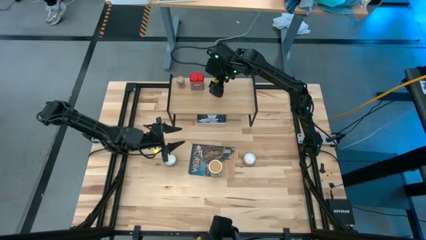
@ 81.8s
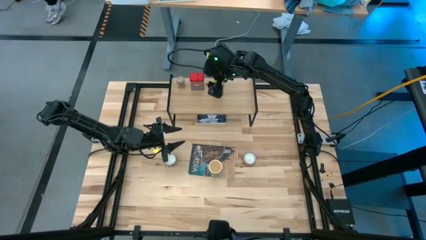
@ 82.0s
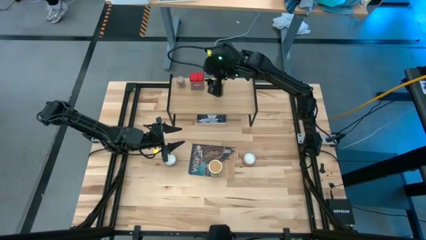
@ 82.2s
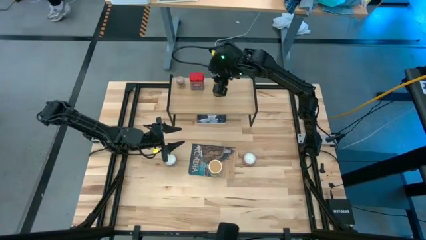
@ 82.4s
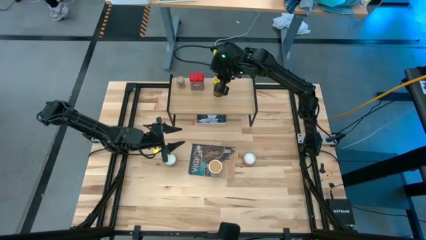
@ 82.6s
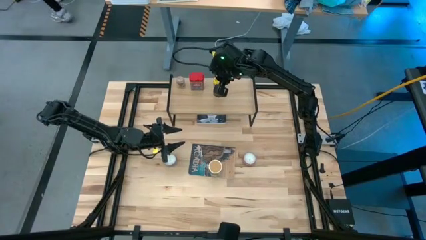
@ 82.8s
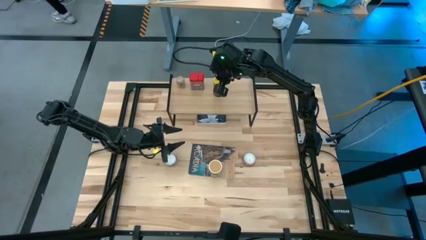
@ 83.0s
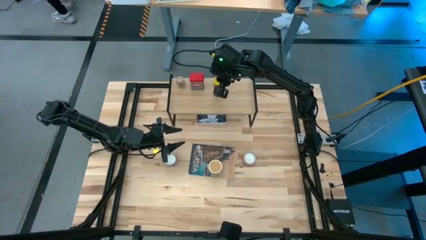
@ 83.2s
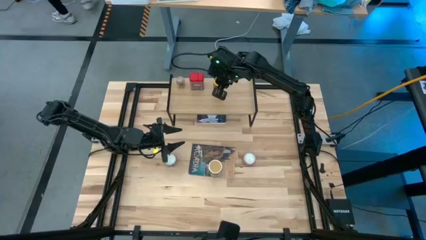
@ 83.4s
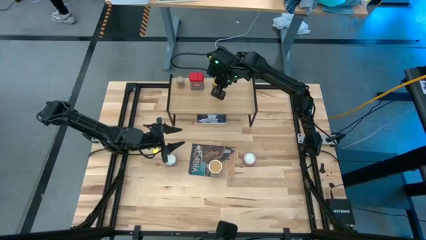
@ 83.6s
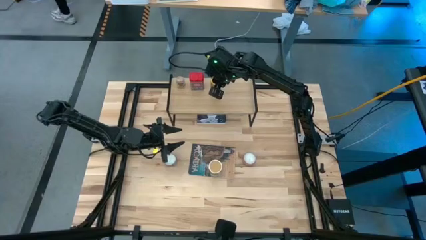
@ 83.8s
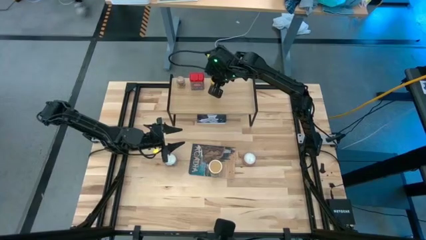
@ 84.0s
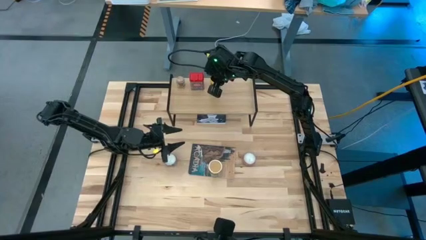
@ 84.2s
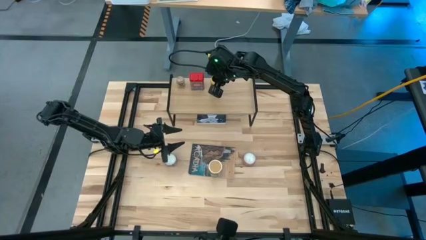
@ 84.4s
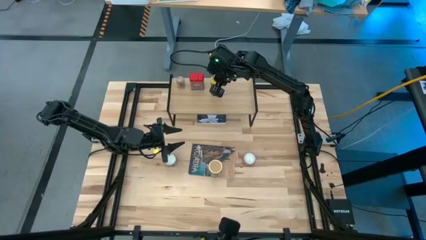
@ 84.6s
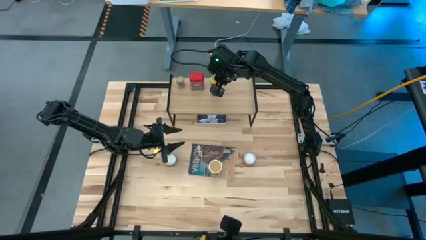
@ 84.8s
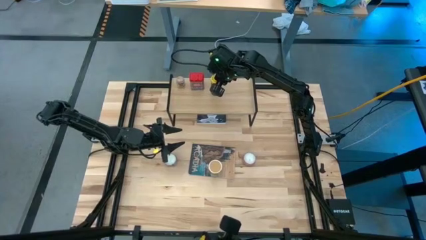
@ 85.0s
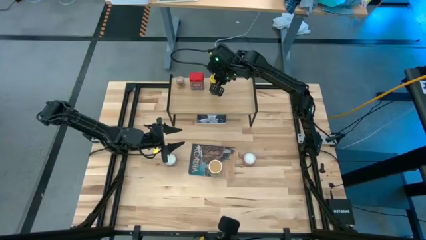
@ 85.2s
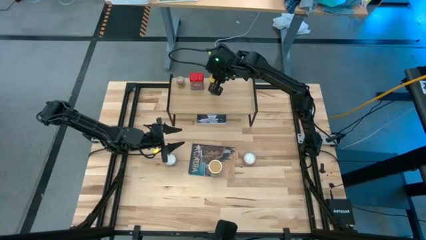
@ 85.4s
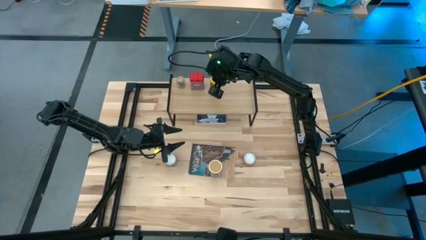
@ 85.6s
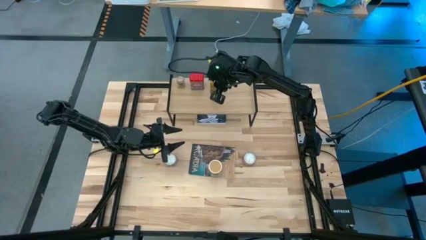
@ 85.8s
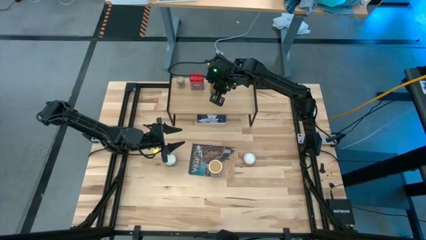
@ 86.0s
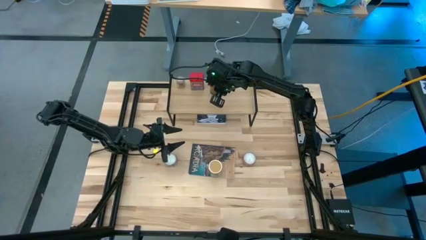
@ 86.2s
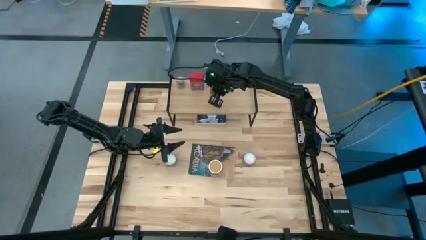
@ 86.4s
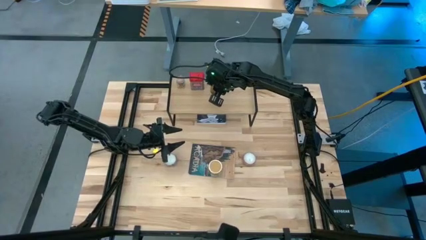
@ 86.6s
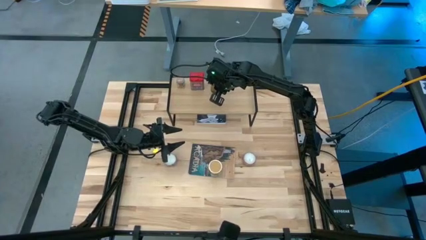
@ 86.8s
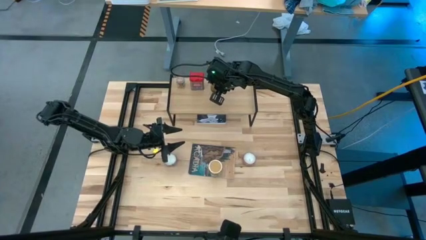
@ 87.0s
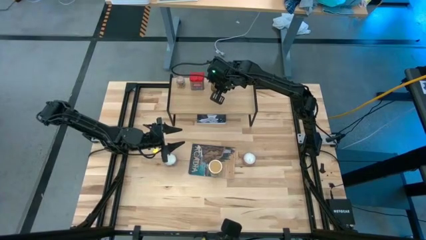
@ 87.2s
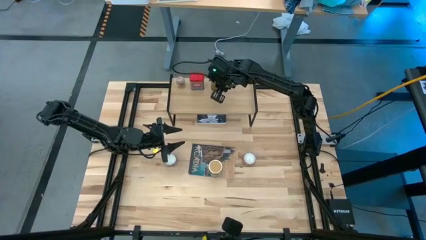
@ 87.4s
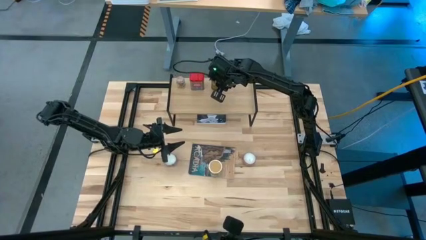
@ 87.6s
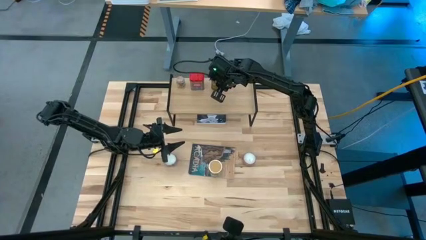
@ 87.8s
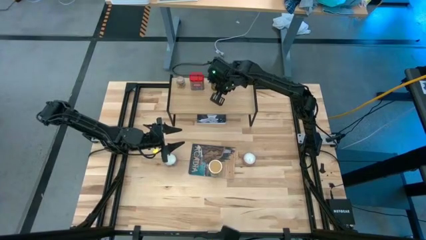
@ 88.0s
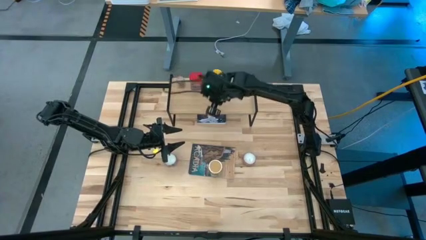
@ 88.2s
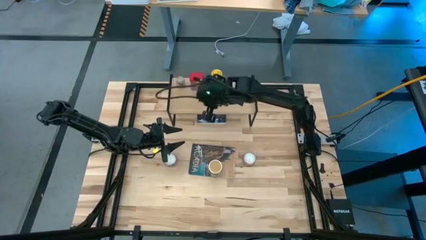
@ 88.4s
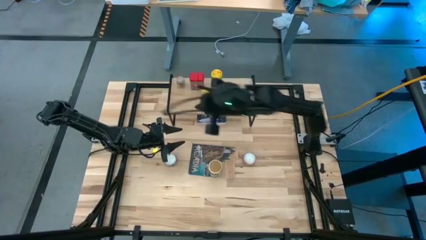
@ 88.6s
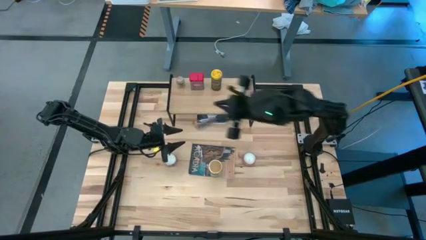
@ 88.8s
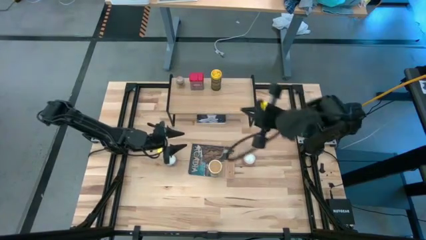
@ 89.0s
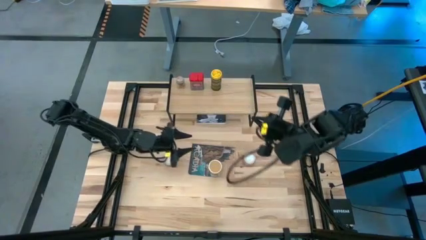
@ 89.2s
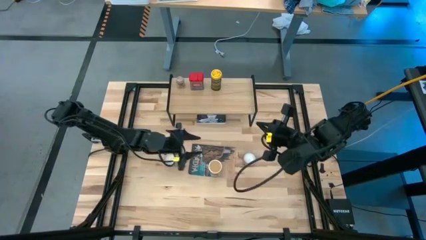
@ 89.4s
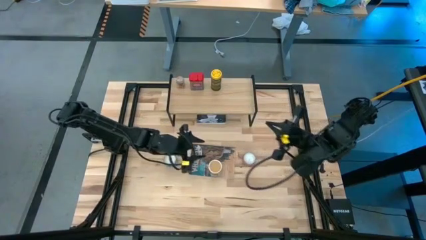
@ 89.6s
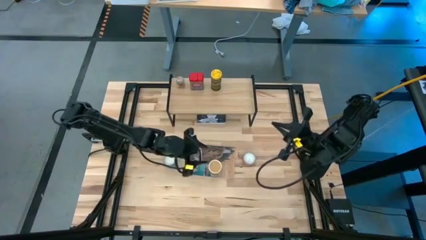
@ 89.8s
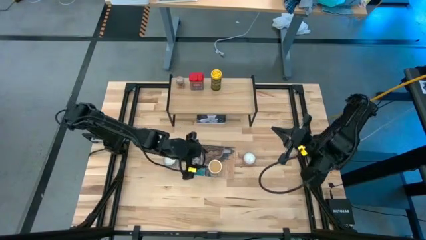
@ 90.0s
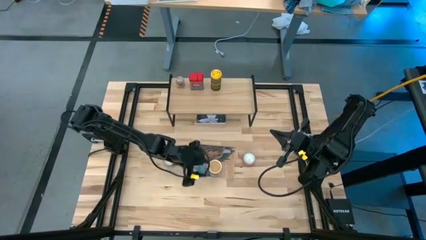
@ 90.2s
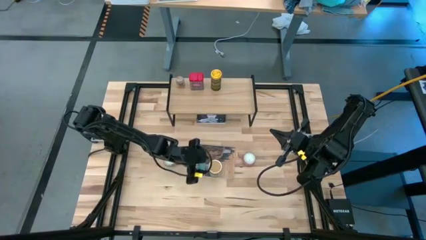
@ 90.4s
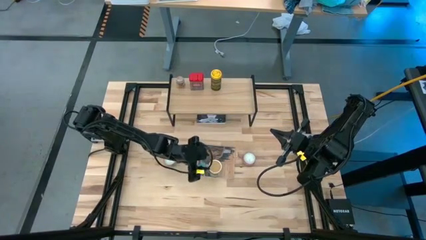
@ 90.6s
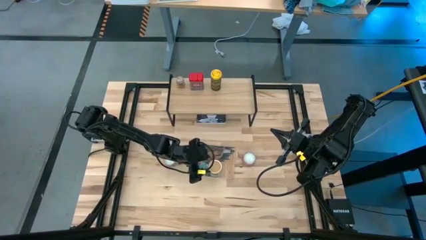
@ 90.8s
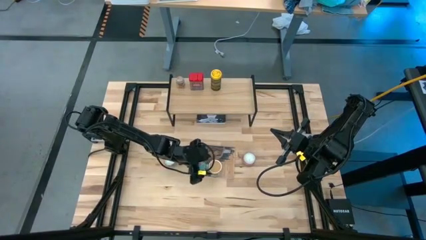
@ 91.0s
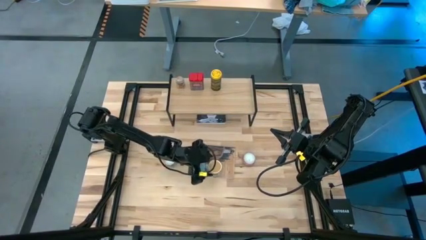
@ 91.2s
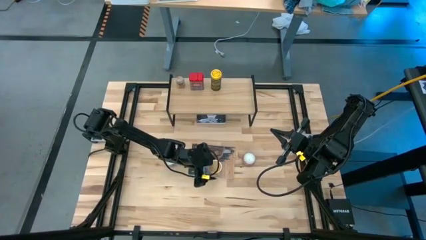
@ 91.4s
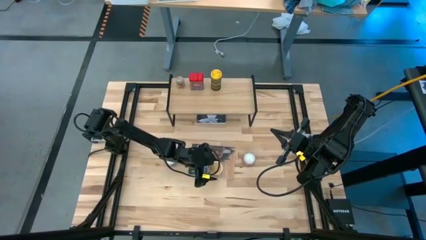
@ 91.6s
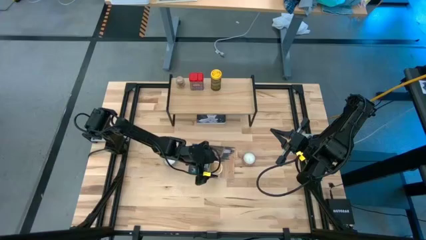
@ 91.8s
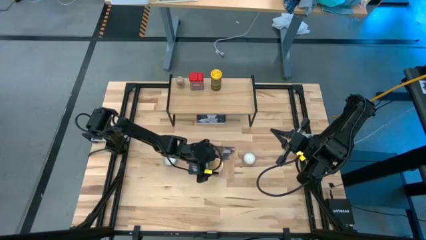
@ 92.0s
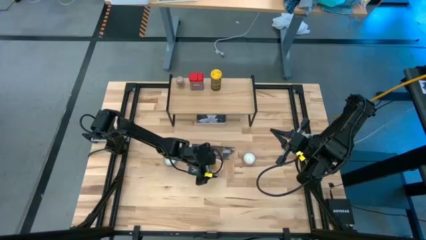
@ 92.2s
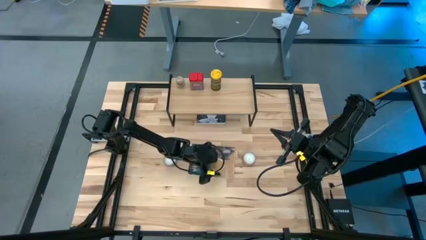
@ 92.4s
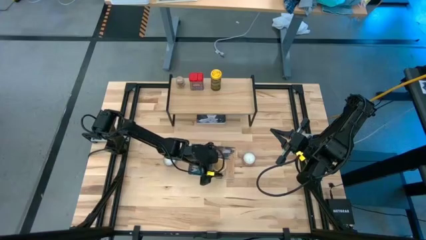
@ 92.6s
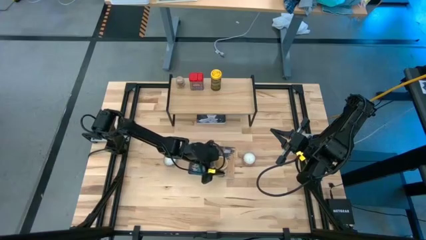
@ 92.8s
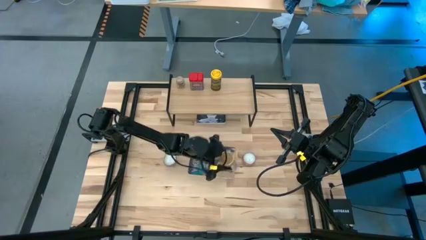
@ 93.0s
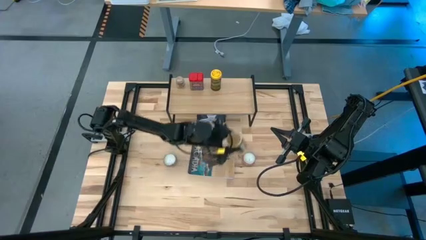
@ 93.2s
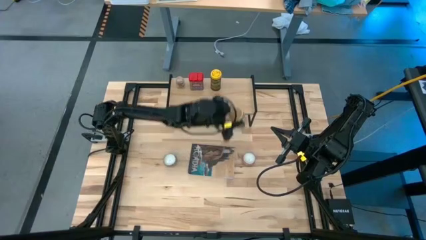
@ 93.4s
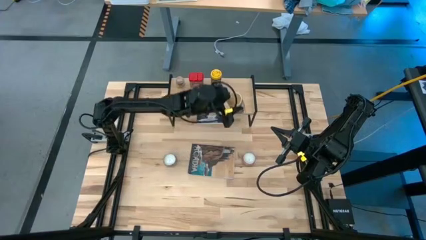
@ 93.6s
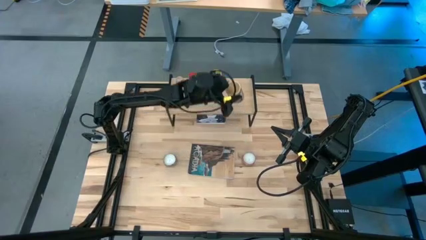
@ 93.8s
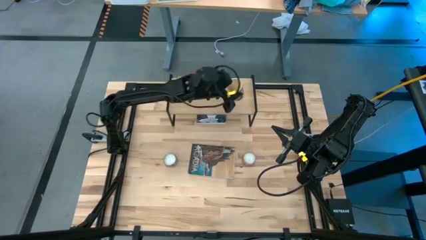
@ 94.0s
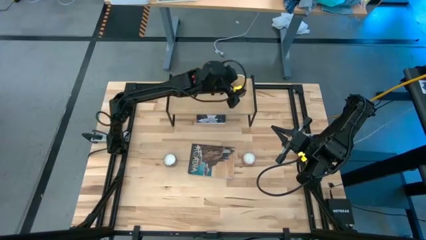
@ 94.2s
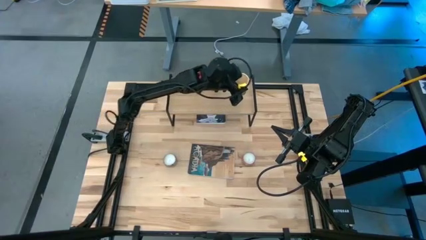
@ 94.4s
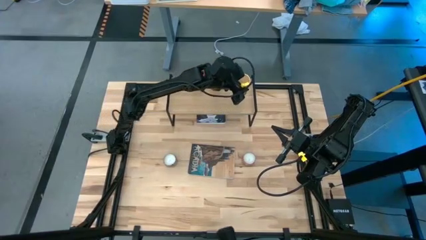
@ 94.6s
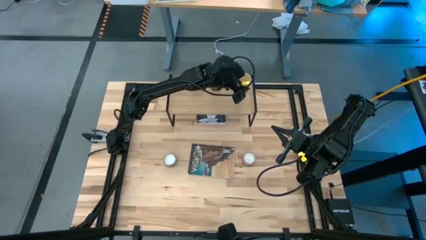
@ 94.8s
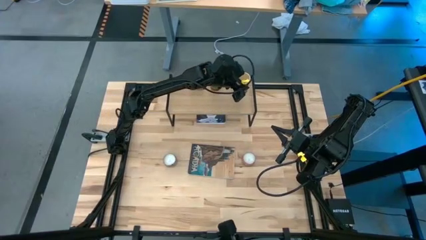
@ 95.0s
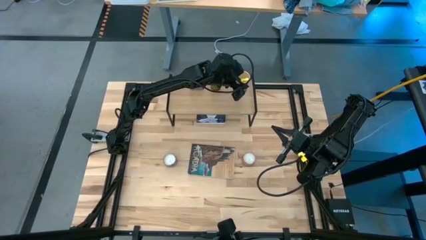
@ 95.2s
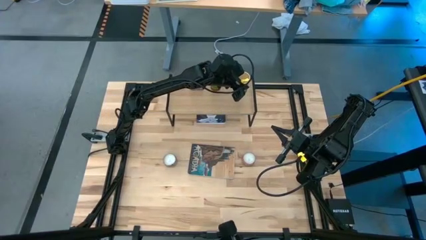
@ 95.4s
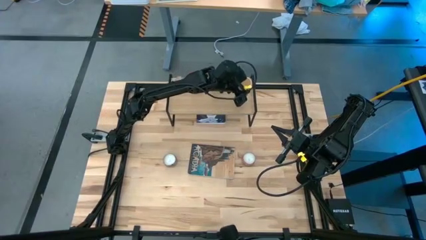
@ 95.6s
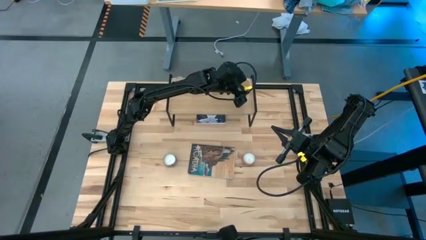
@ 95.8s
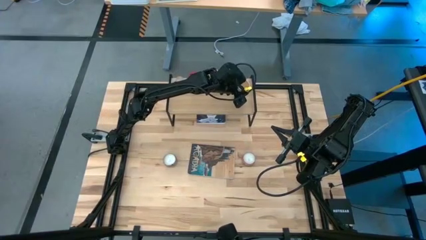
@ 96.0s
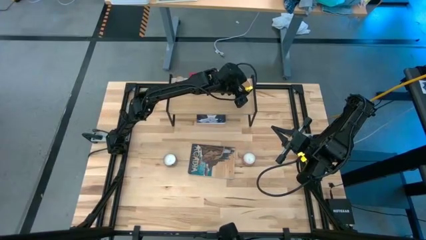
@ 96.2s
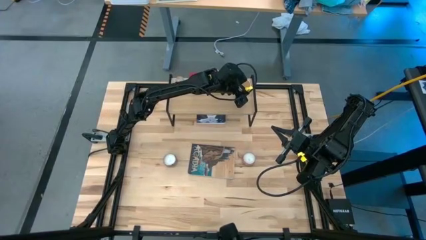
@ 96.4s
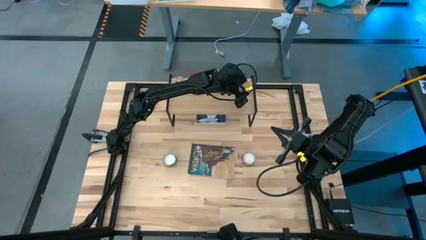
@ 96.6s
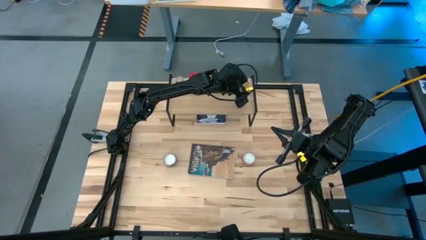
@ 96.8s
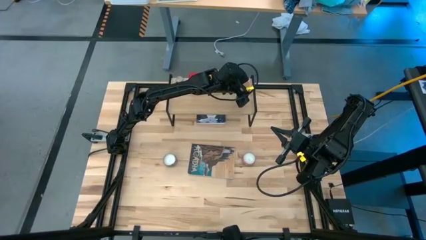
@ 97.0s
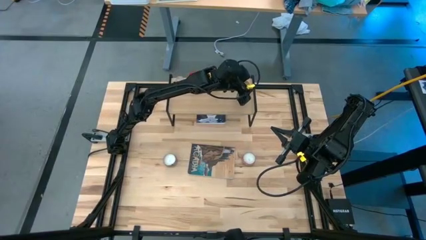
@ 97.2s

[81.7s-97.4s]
Task: Shelf spices
Put the brown seasoning bottle on the shelf
